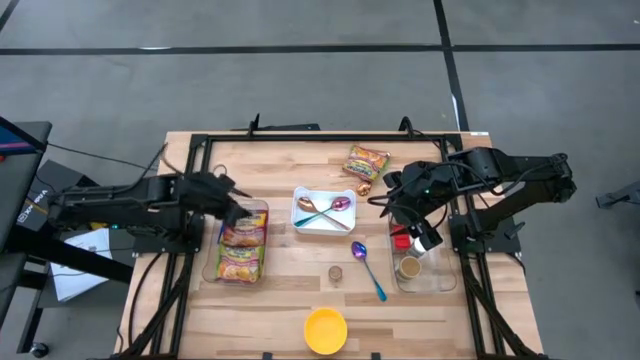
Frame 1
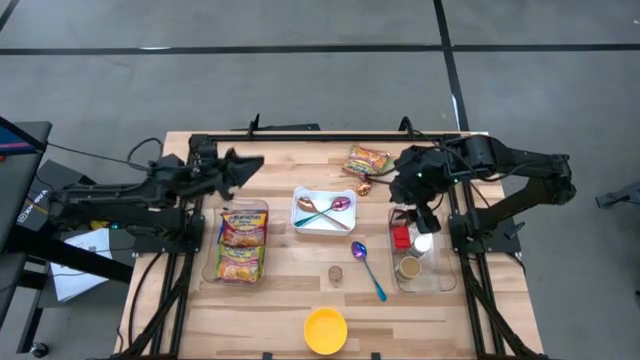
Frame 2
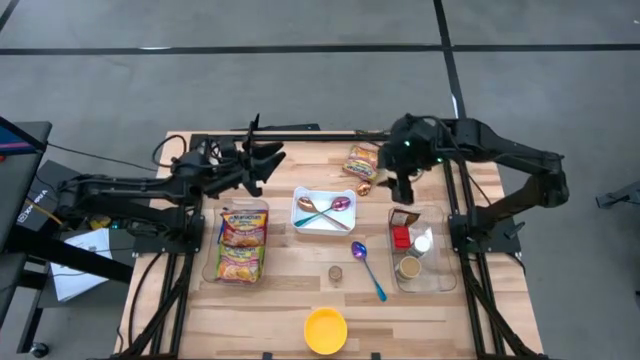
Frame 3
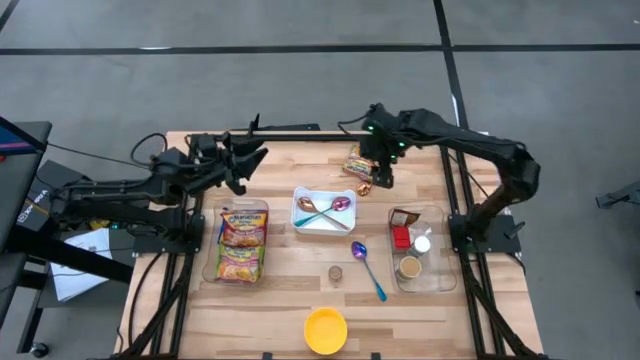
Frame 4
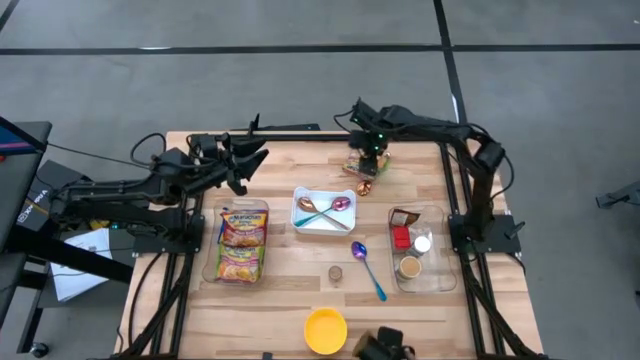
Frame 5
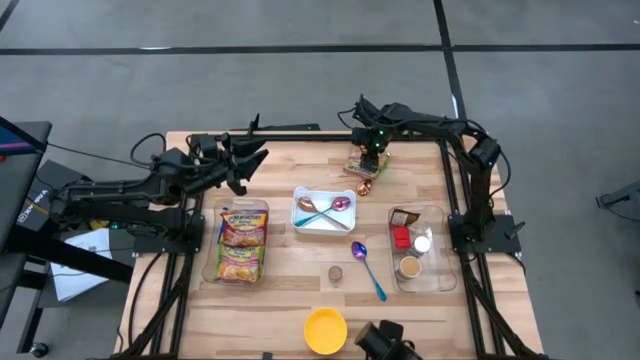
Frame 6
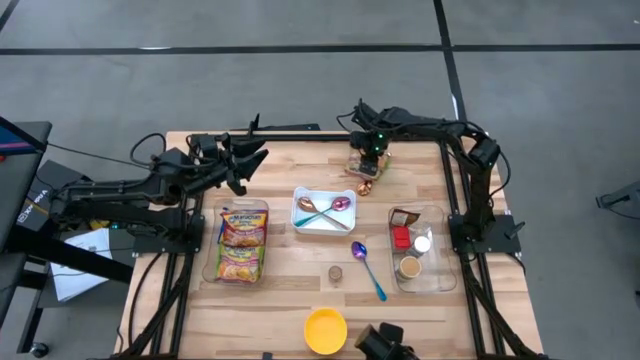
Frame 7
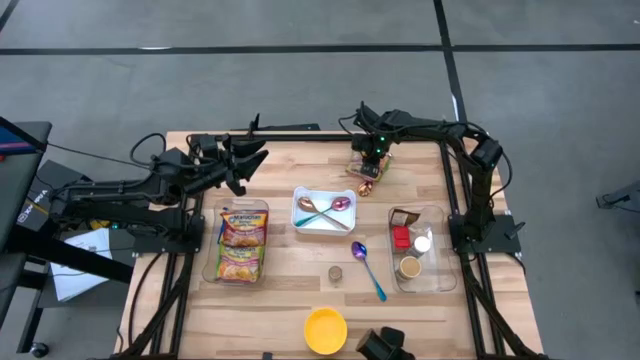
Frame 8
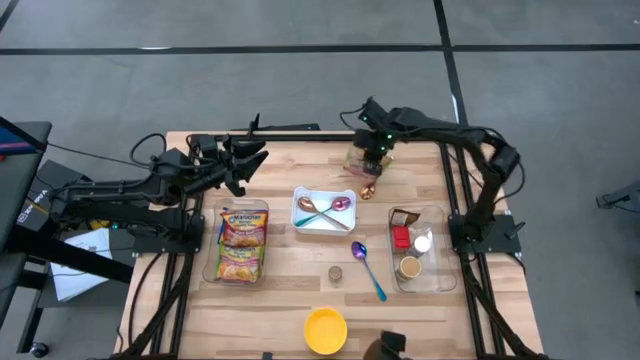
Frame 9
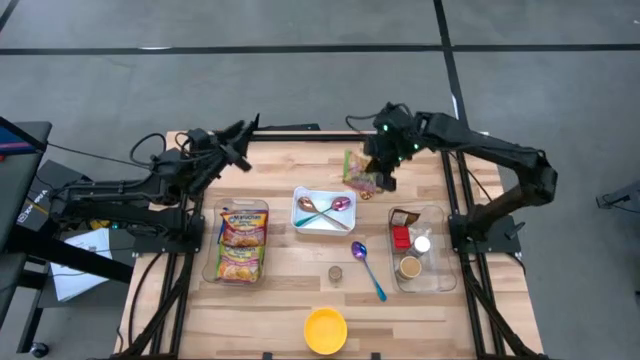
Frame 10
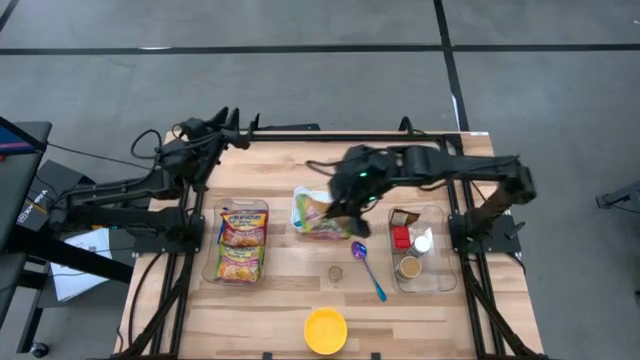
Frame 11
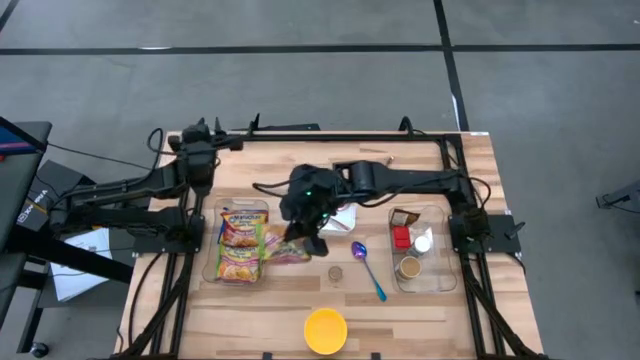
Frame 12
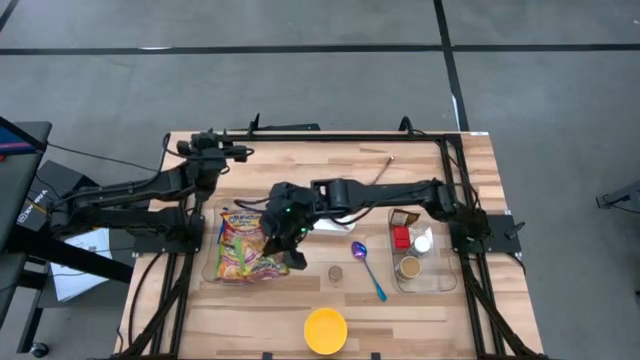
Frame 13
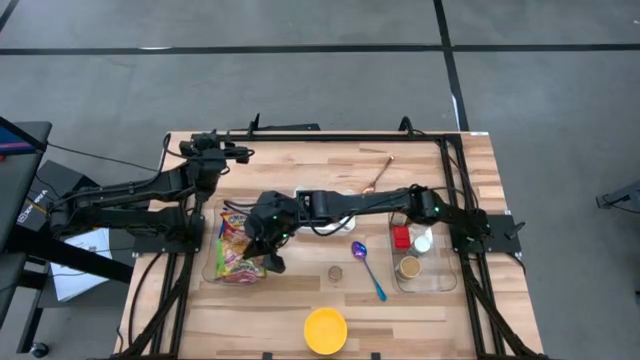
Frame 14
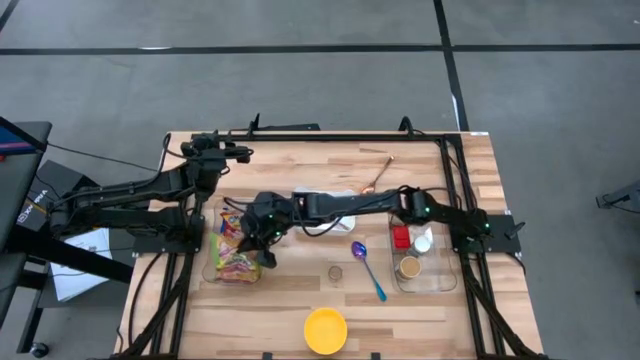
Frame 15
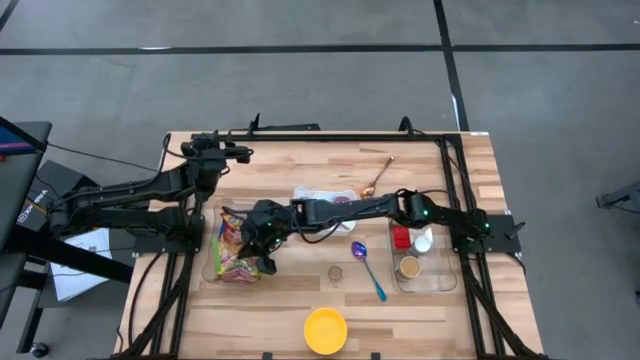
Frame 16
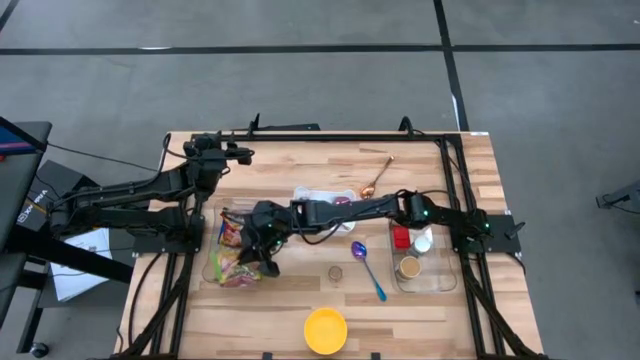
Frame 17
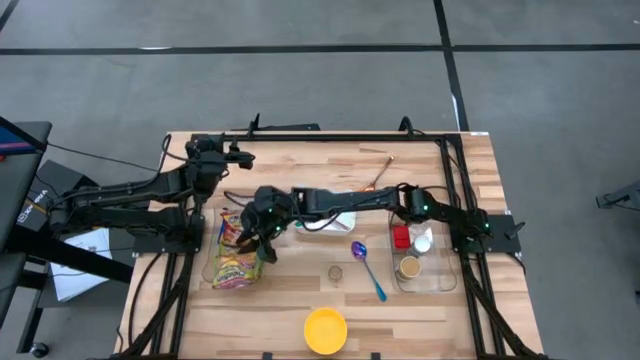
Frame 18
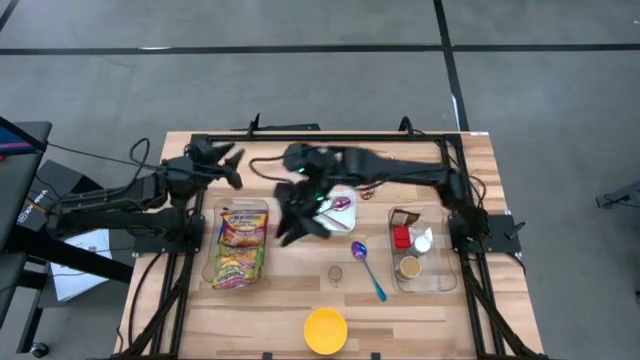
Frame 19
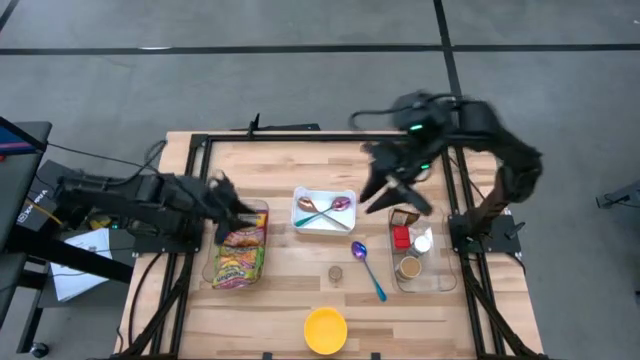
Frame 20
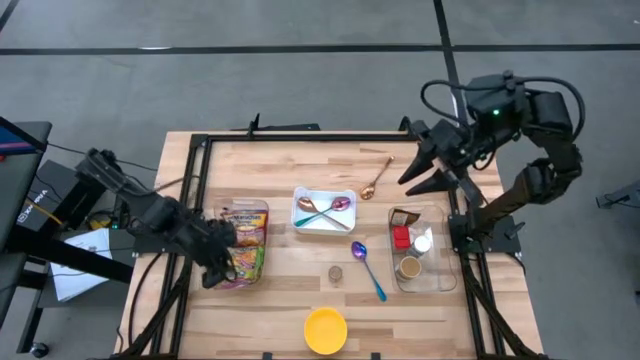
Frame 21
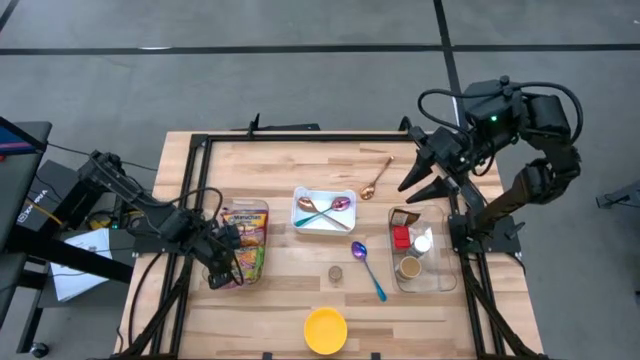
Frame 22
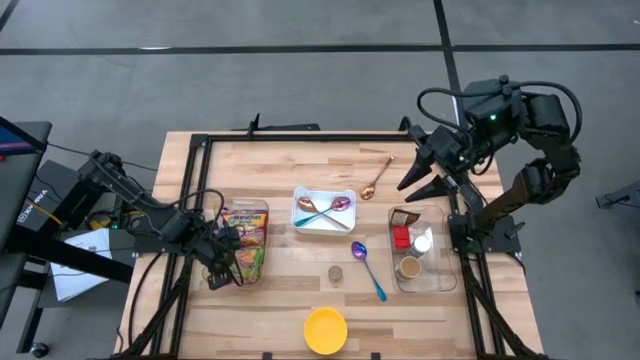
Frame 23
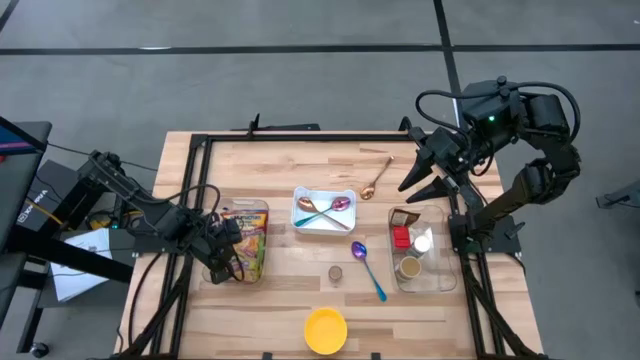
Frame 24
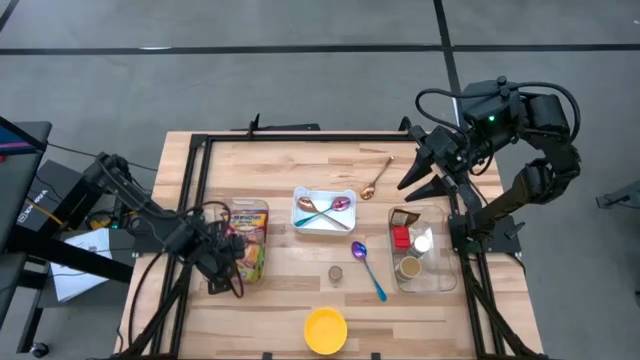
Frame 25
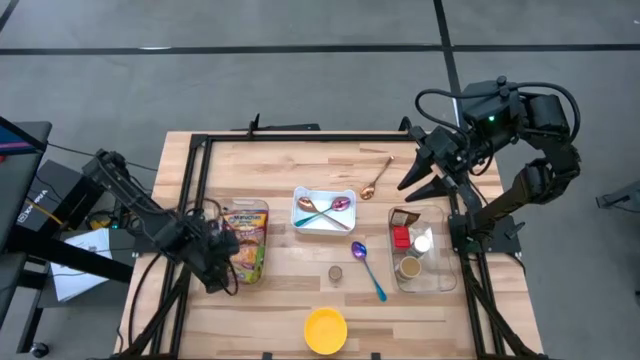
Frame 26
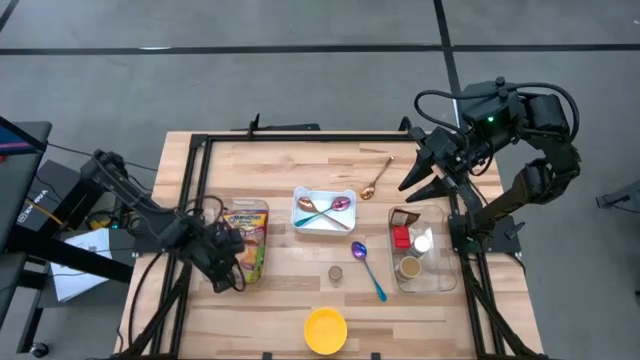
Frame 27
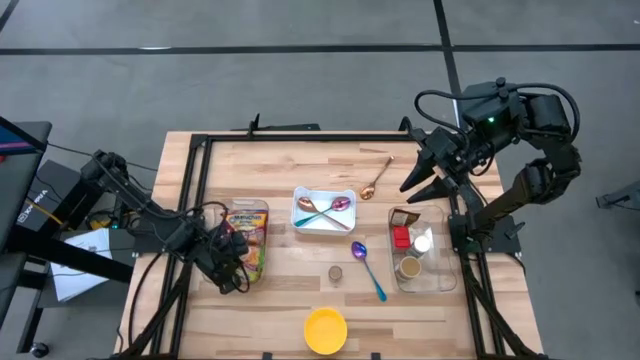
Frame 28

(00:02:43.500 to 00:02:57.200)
Task: Pick & Place Food Item
Put the green noodle pack into the left transparent bin

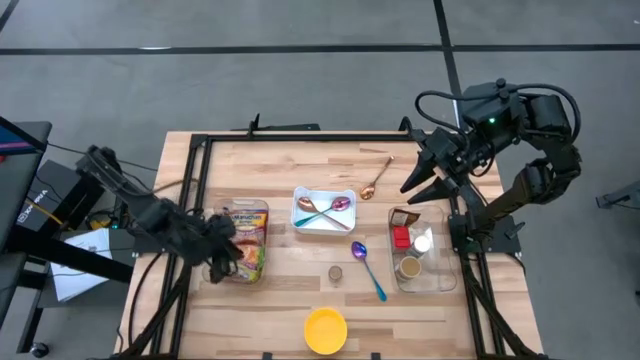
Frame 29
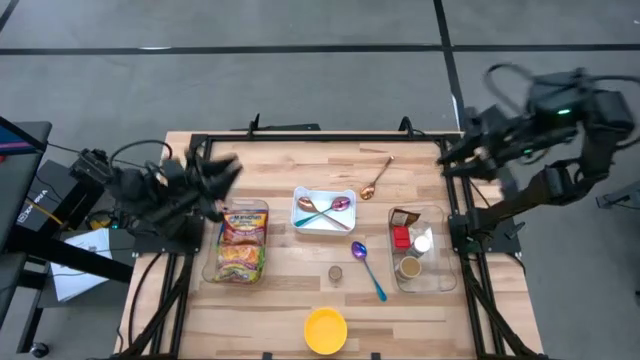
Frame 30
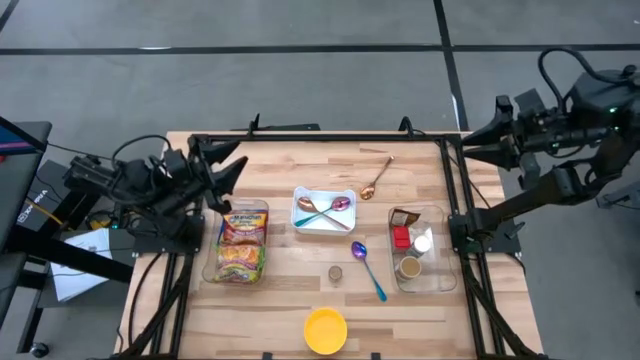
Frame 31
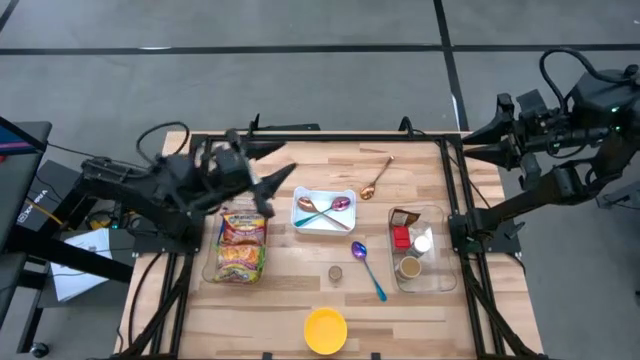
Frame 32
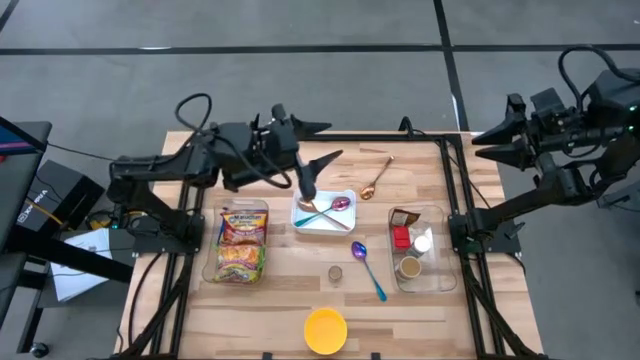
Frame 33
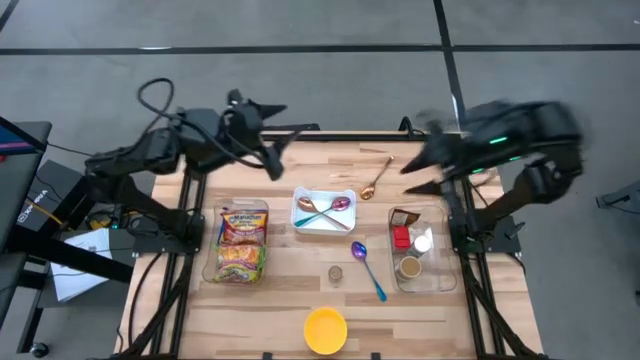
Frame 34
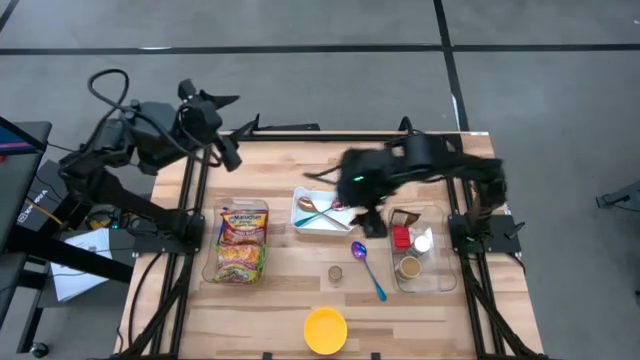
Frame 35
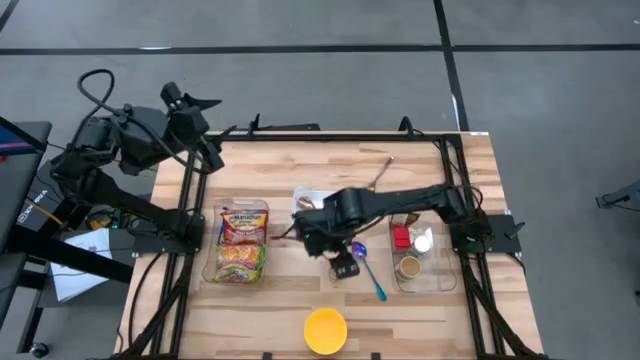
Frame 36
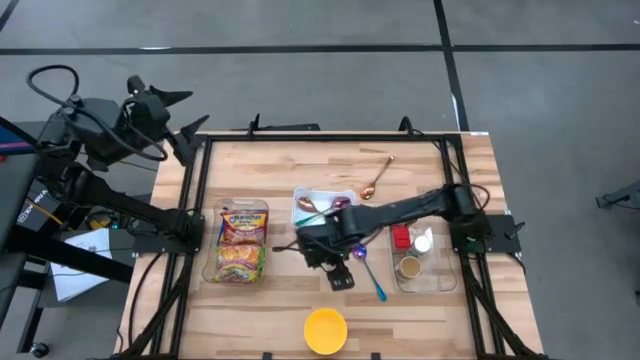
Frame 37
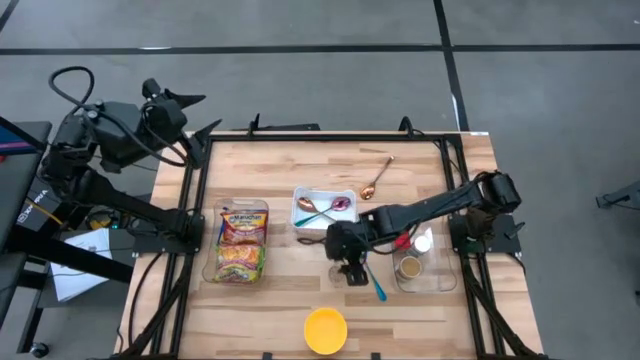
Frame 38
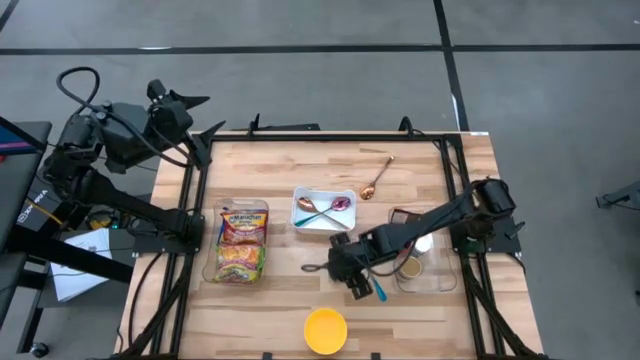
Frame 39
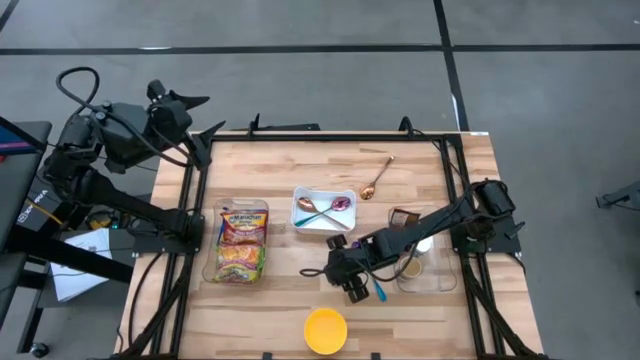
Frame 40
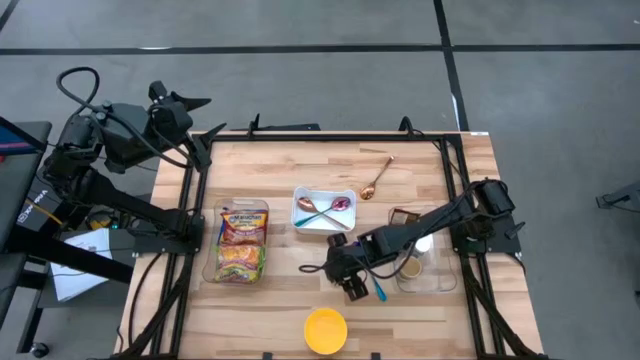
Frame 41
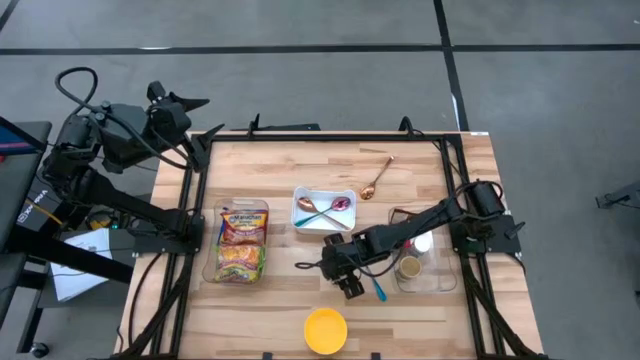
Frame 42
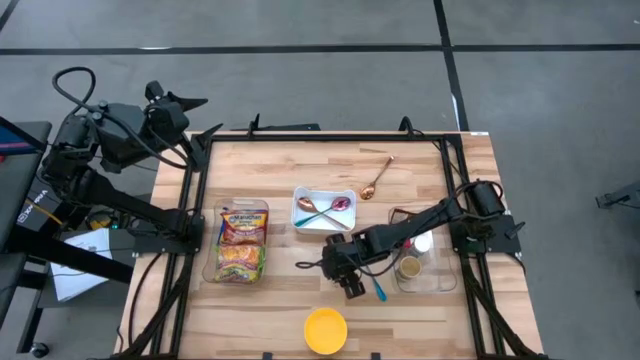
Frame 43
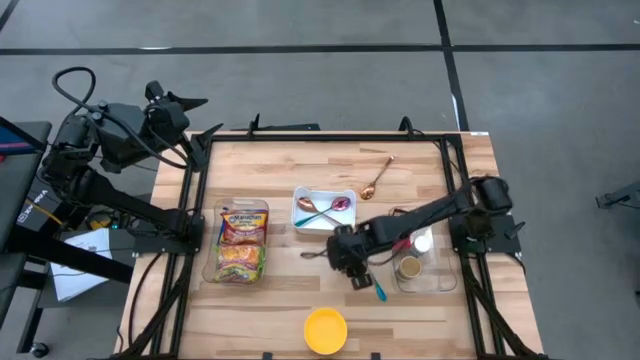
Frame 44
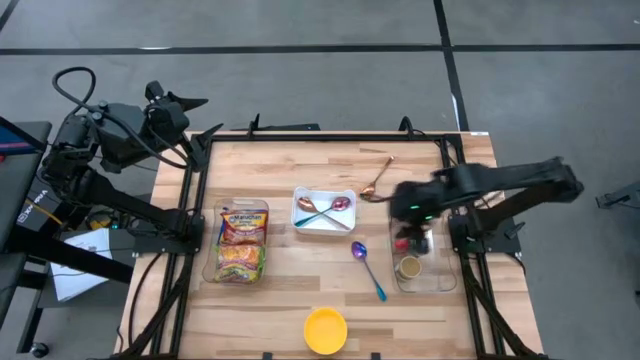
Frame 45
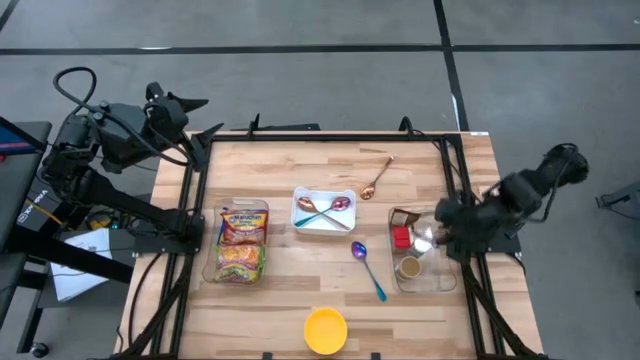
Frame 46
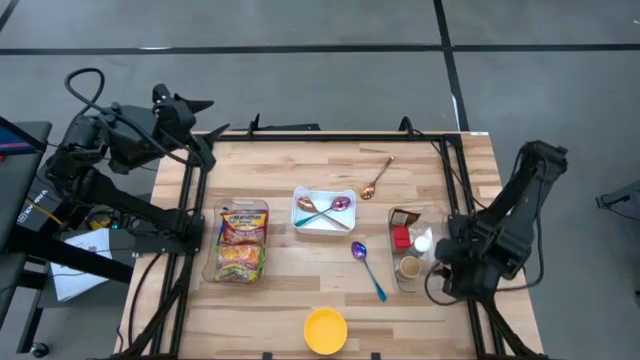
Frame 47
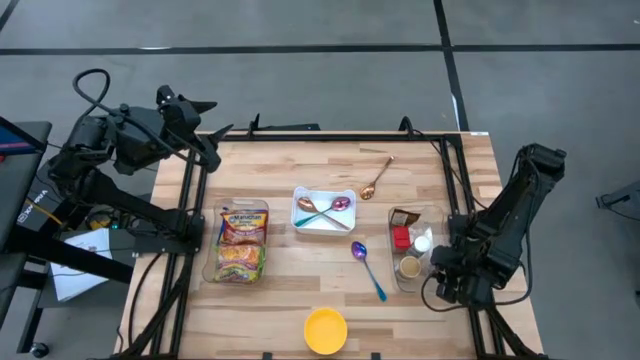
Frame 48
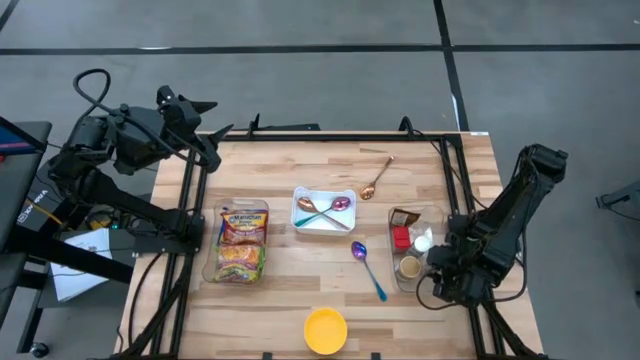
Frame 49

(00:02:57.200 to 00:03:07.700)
Put the brown seasoning bottle into the right transparent bin
